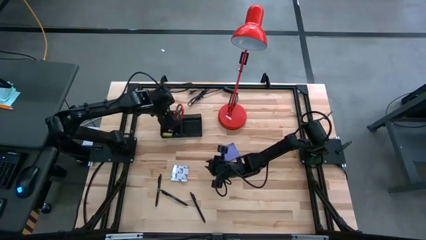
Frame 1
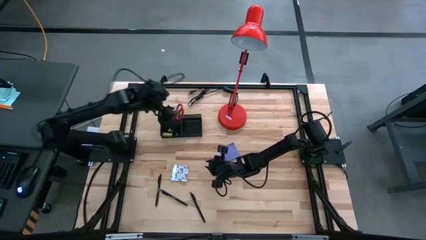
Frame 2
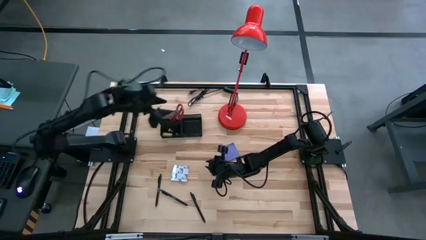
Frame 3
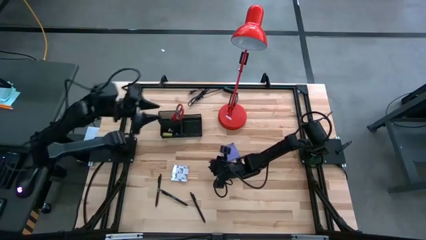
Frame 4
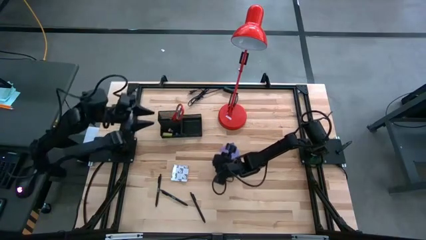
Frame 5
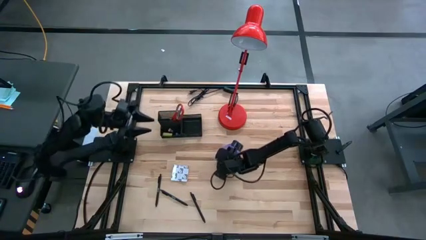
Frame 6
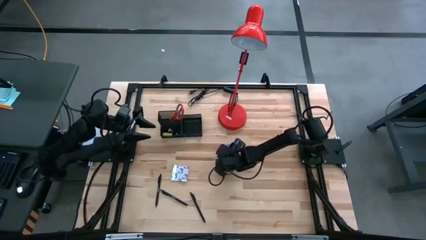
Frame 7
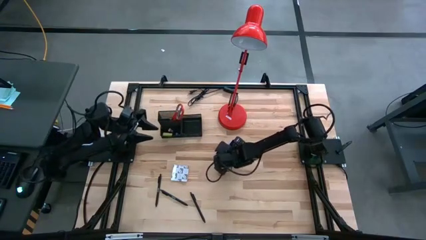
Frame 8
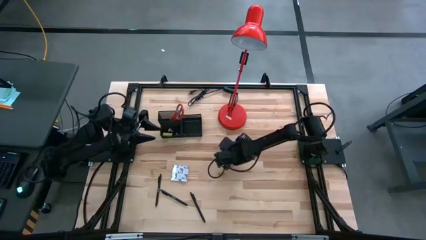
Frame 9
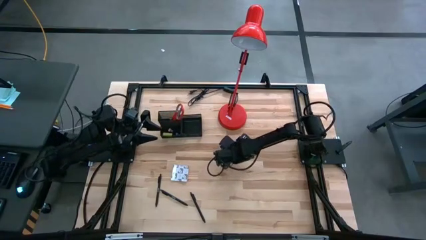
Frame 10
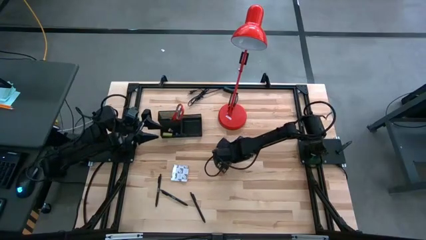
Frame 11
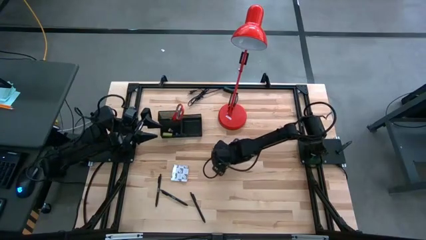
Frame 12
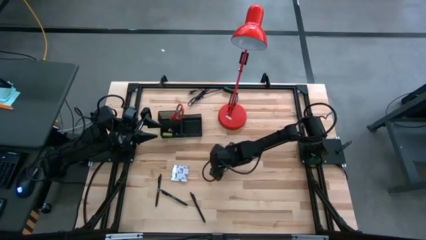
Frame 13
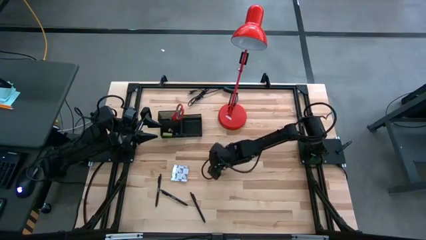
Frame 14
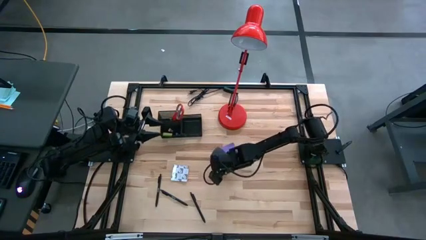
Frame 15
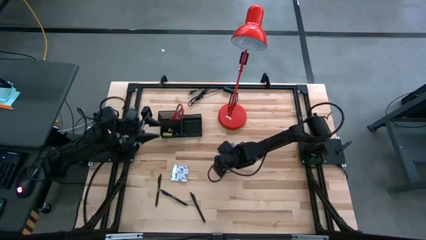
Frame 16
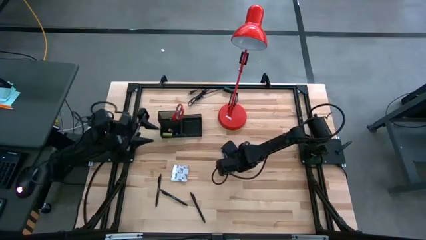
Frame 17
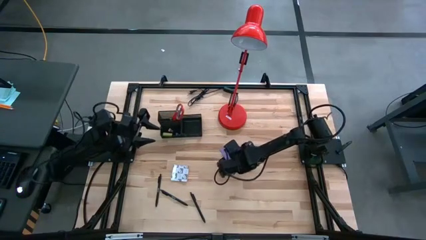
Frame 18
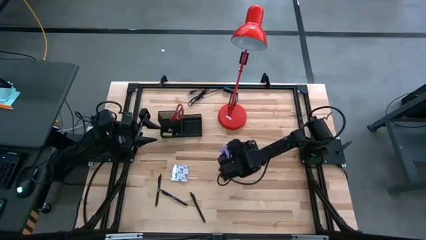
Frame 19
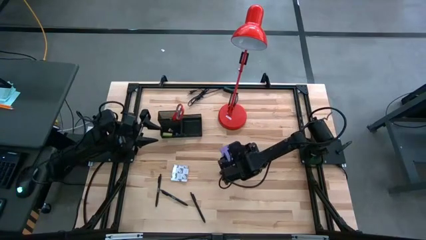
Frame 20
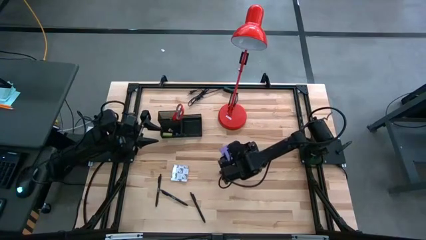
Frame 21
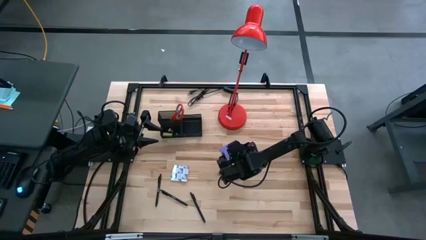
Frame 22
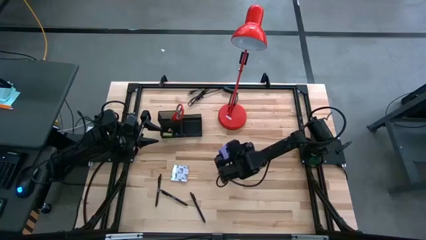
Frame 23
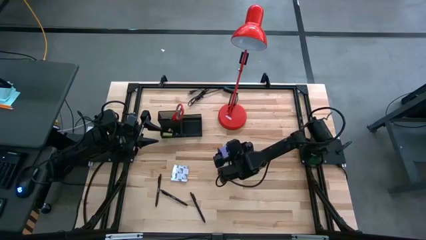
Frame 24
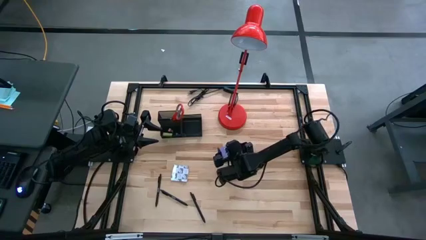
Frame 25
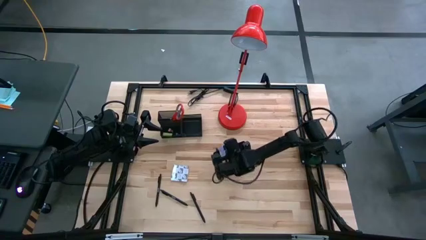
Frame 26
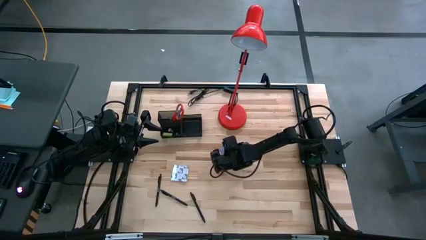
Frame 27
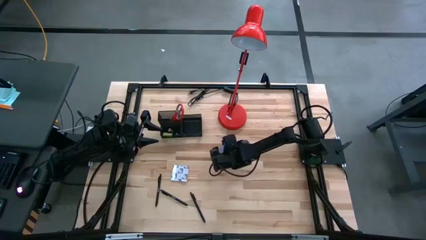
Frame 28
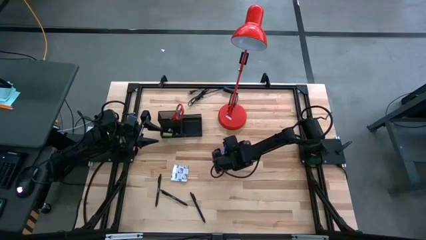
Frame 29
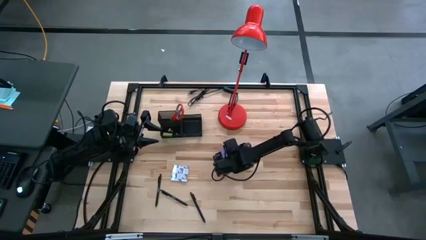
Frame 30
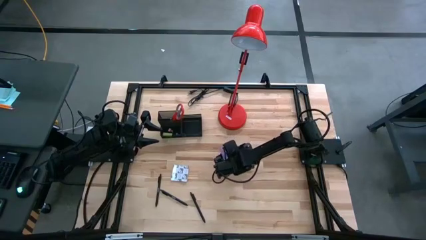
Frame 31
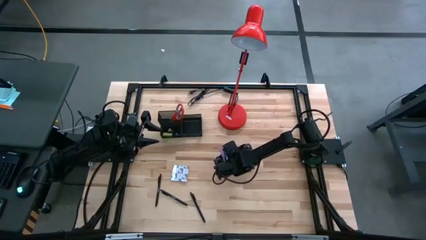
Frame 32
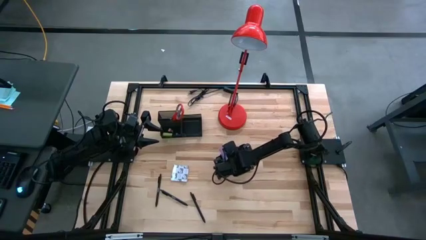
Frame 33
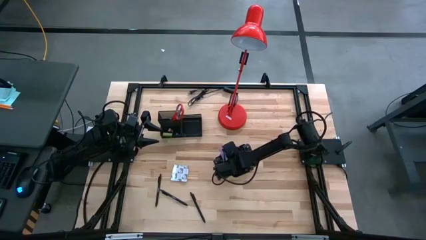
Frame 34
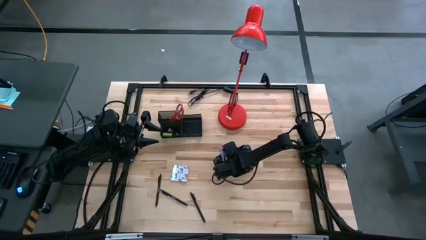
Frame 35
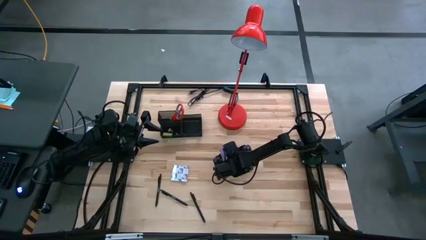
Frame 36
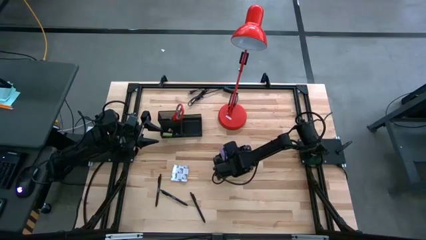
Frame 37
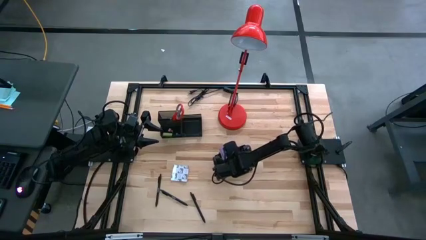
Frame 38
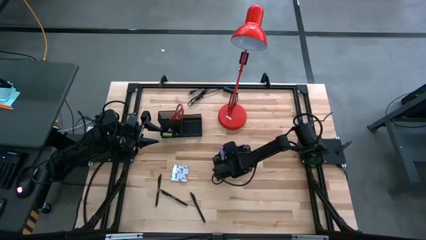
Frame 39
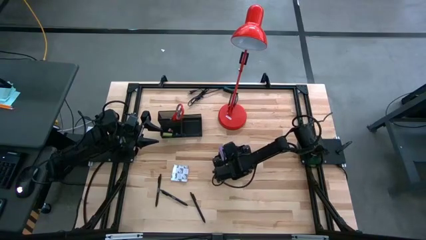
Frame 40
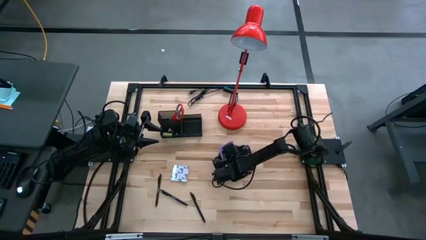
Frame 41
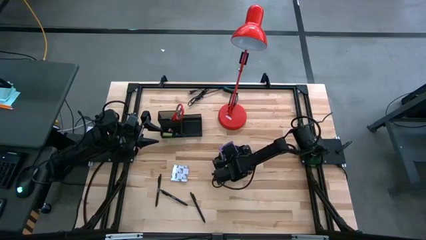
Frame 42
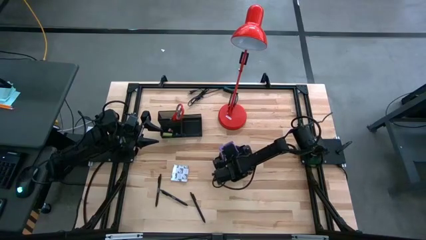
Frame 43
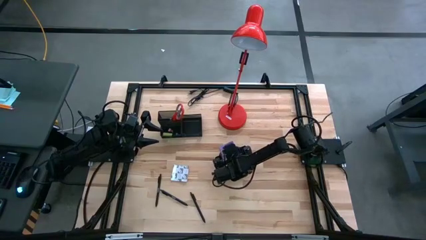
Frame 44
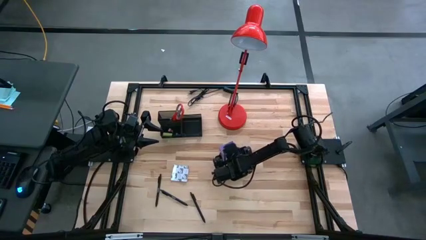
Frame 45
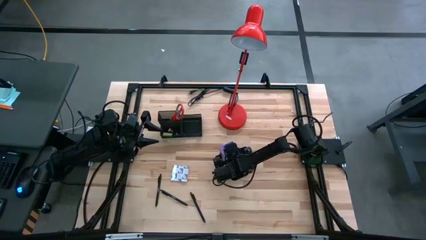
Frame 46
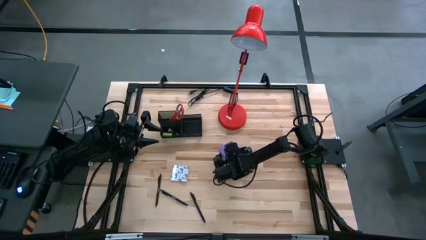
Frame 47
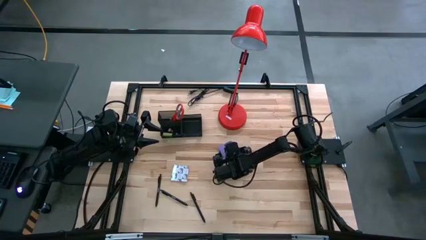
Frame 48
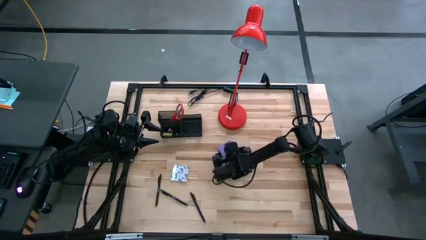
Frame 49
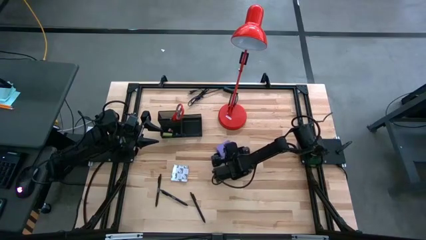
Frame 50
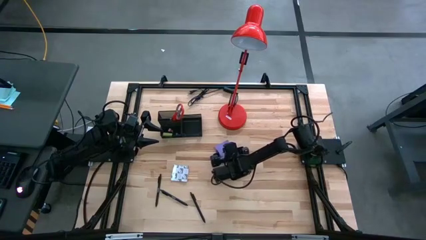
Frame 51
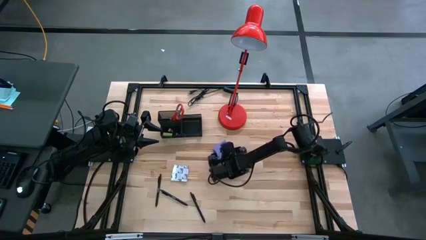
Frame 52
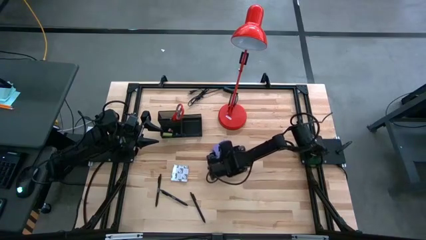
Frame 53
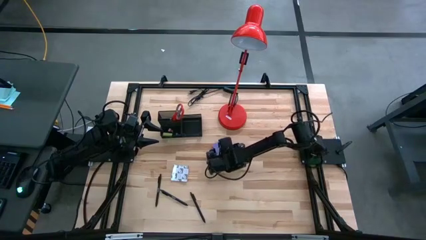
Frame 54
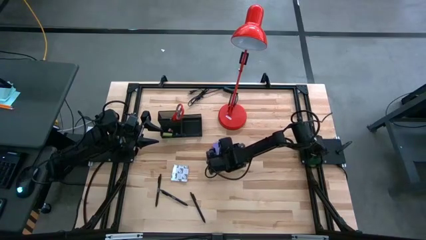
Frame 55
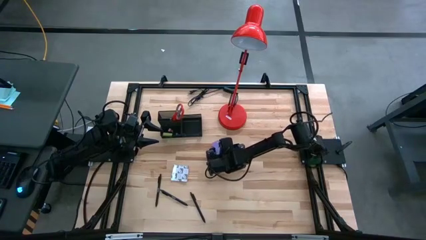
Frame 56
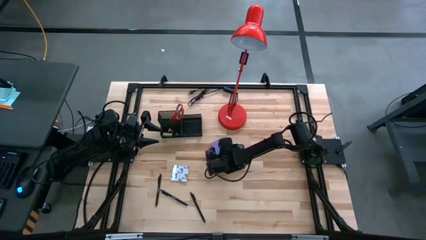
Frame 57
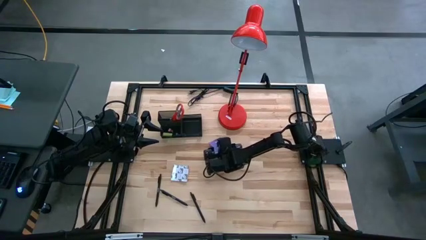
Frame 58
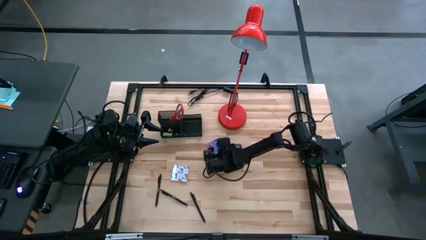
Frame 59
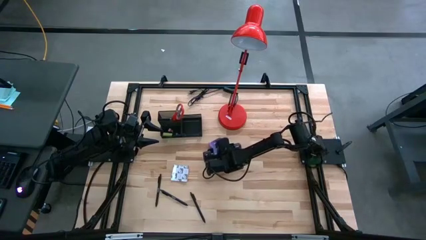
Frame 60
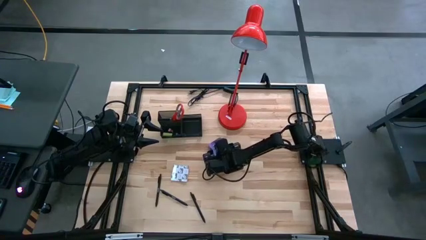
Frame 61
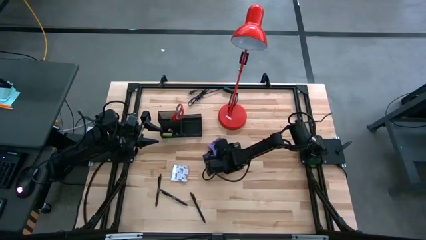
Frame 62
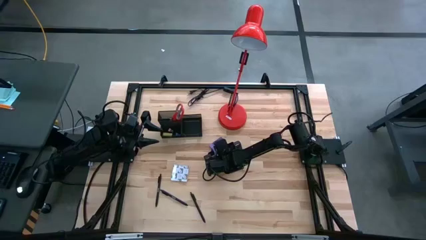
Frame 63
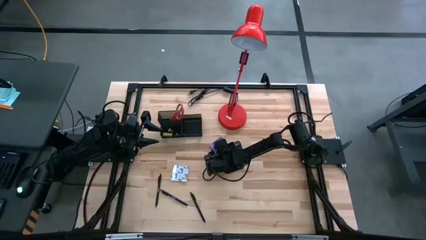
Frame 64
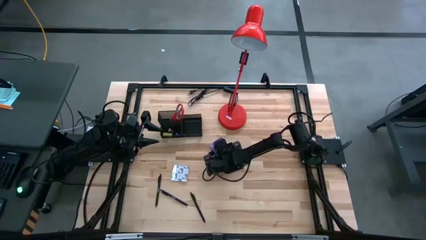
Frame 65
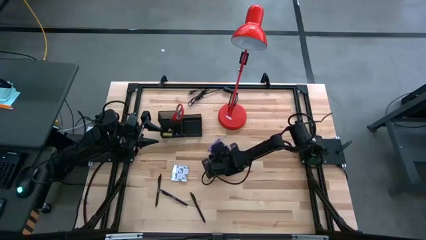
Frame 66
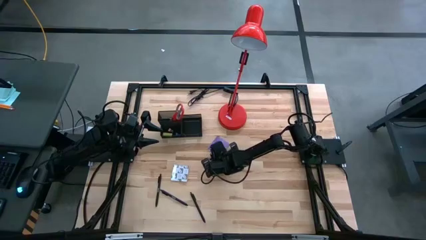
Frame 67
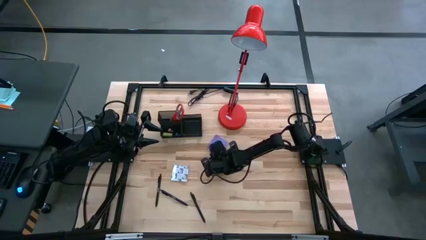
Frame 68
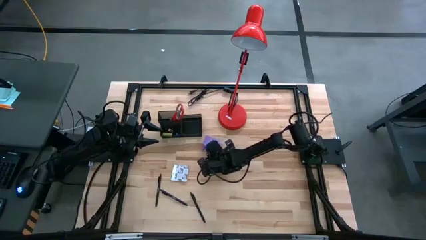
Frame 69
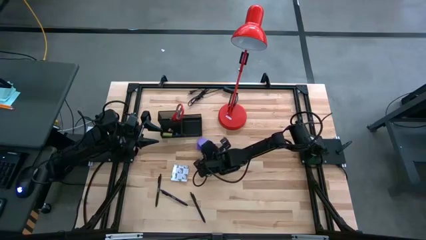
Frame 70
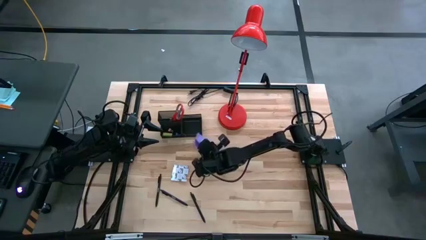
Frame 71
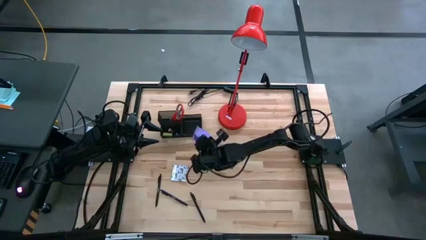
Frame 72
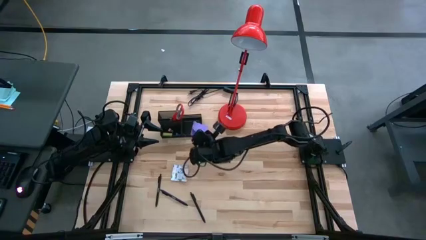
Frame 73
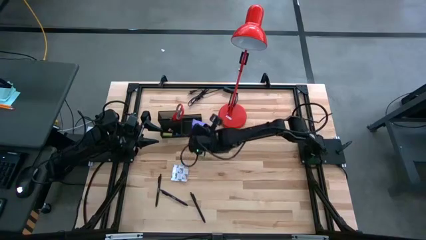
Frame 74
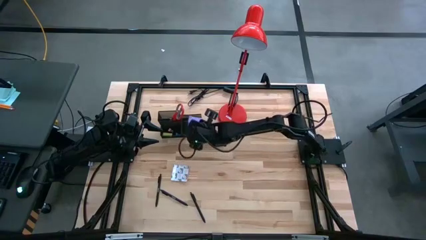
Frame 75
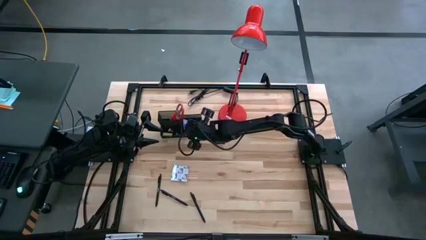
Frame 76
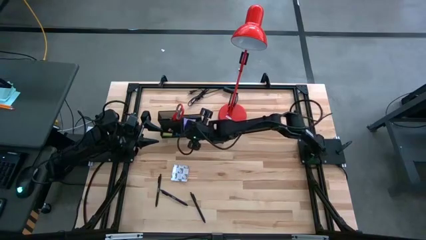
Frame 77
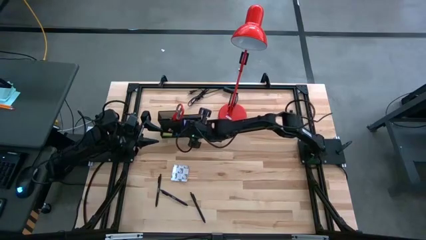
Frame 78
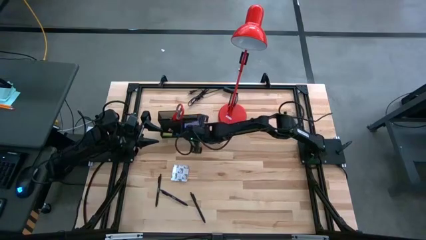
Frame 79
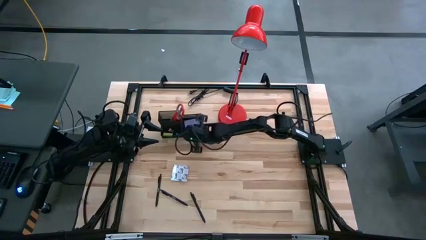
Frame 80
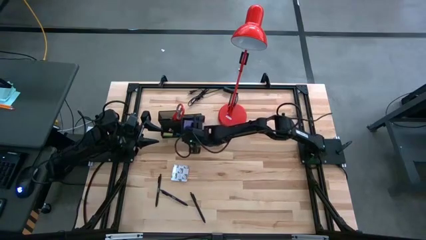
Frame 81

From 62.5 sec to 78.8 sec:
Task: Pick and place office supplies into organizer
Put the violet sticky notes into the black desk organizer
